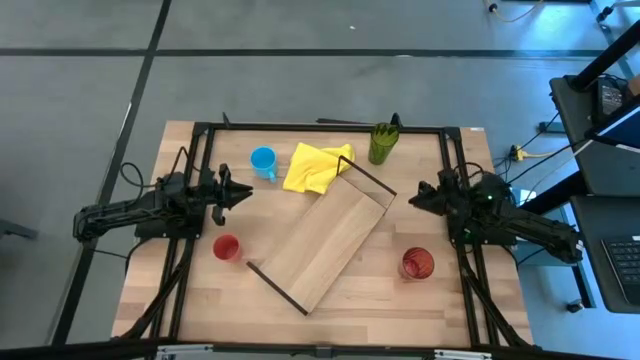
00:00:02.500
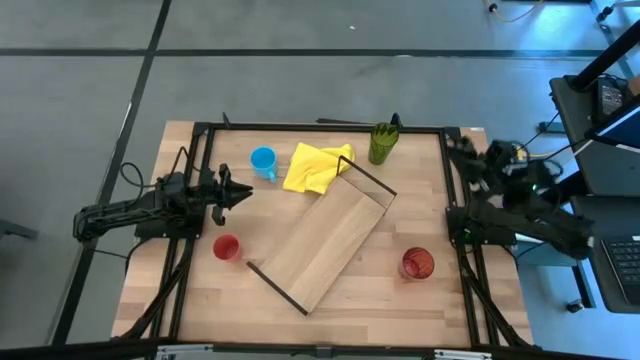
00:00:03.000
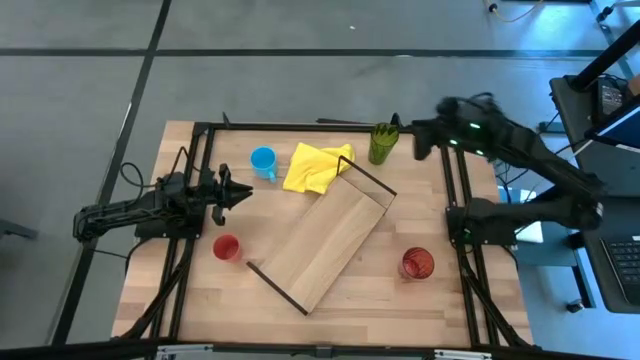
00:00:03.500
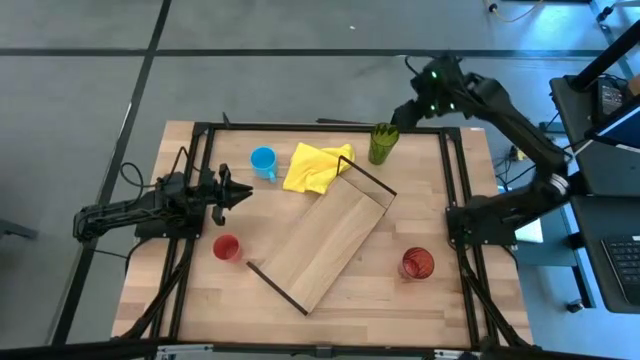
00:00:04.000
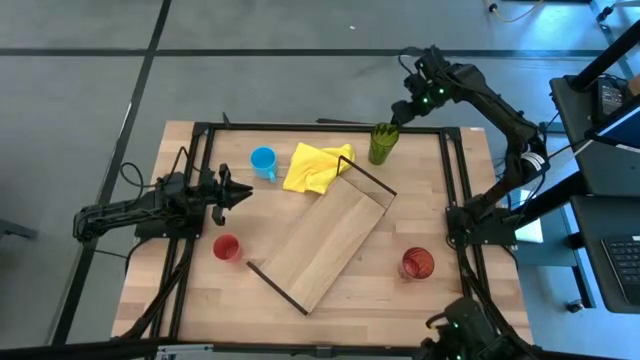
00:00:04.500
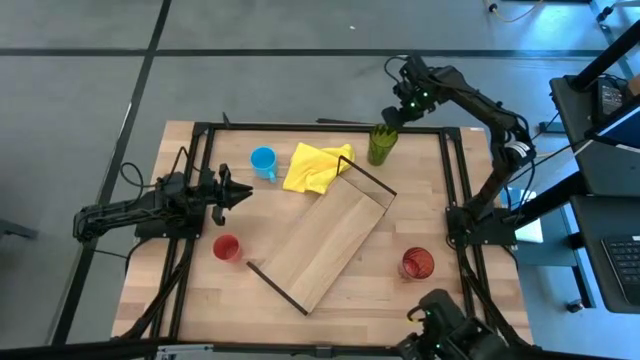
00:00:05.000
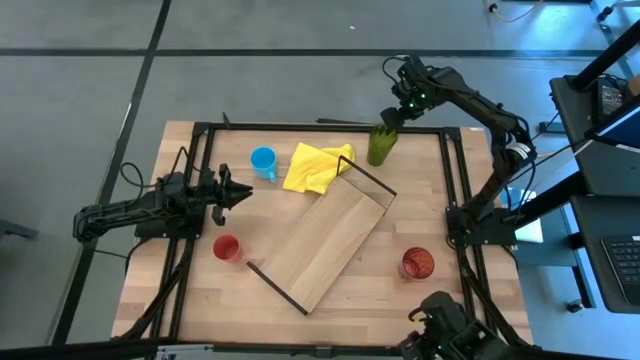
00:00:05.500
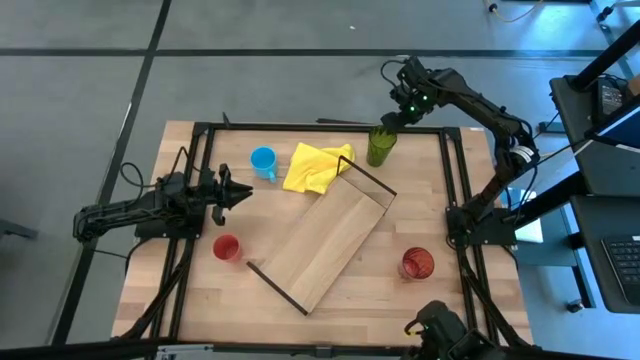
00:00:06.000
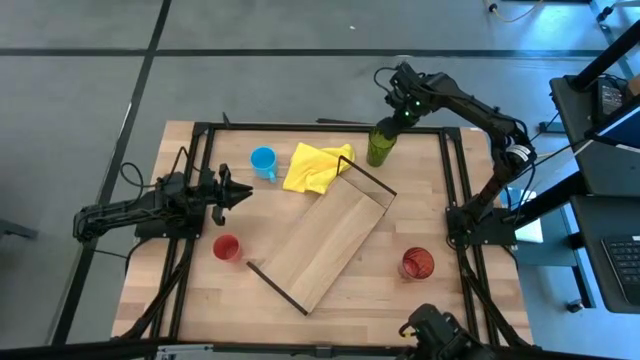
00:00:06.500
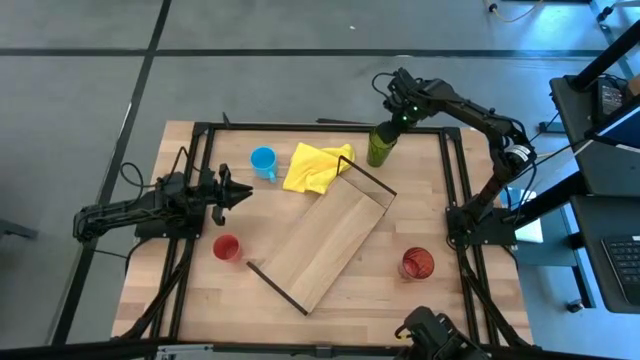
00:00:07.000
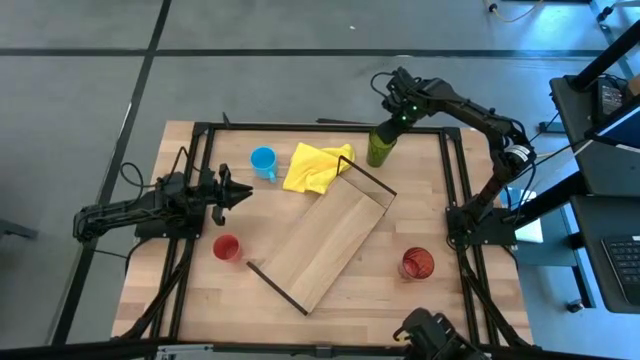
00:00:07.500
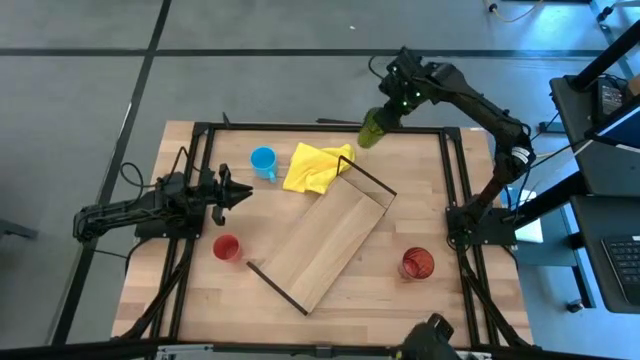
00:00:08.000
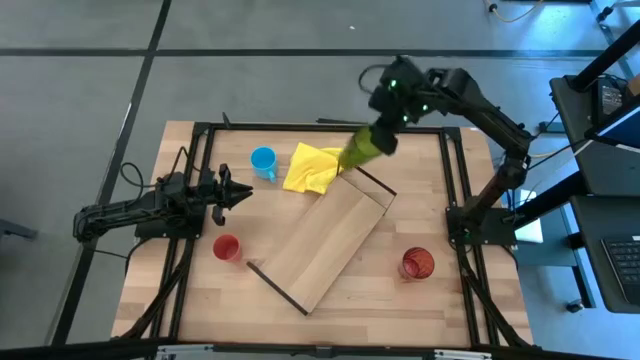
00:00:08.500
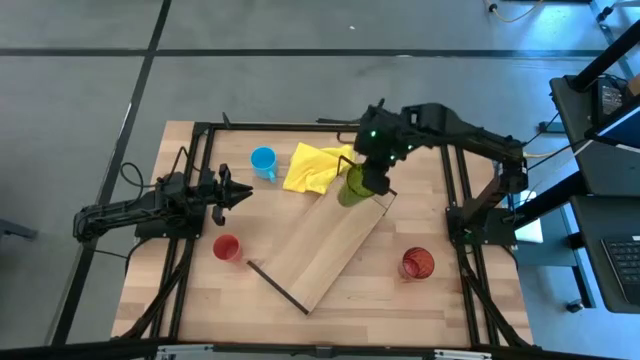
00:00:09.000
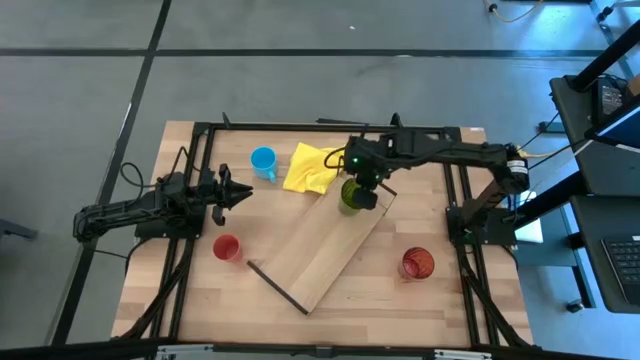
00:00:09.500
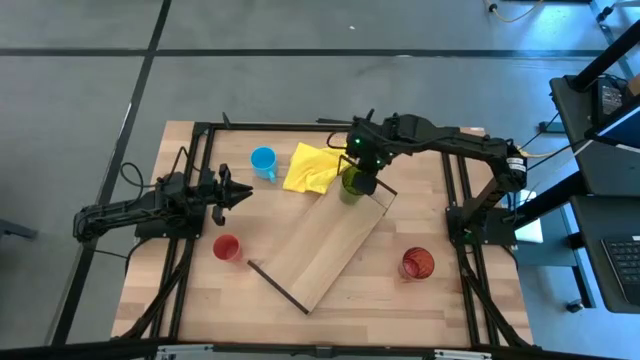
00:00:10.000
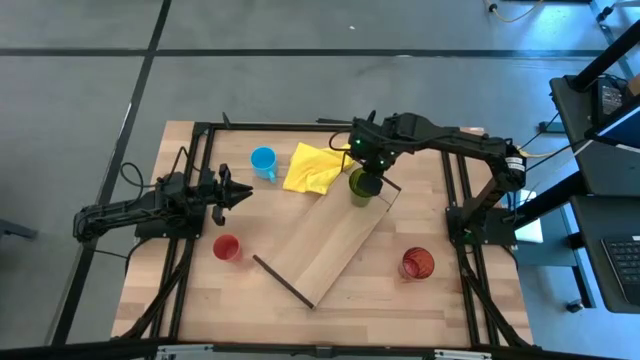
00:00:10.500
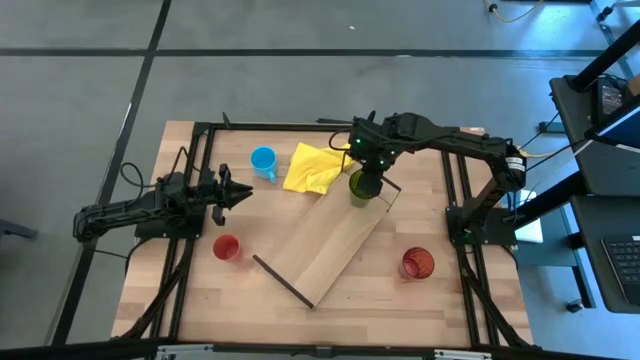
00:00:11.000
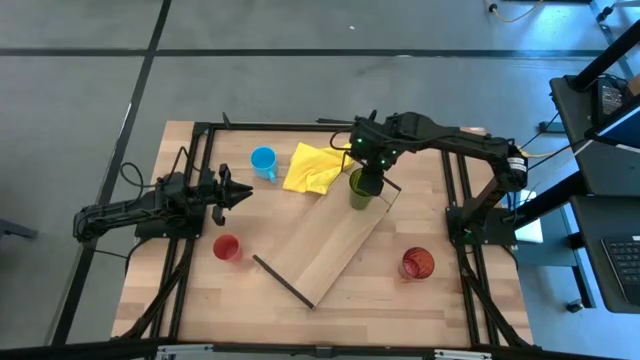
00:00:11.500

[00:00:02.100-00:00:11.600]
Task: Stack small to large cups/mugs on shelf
Put the green cup on the shelf

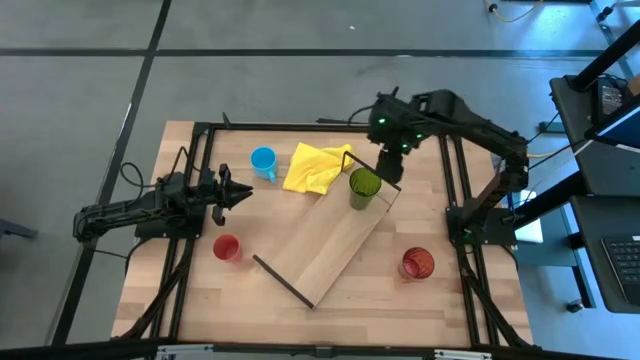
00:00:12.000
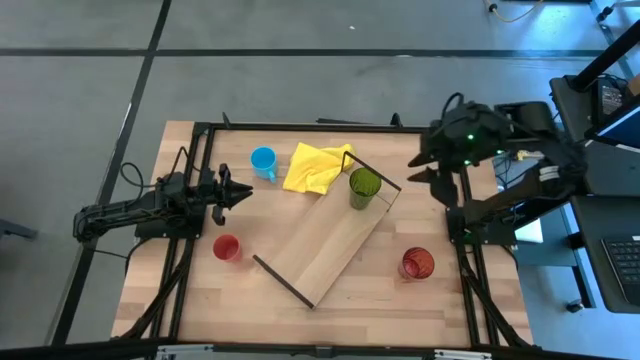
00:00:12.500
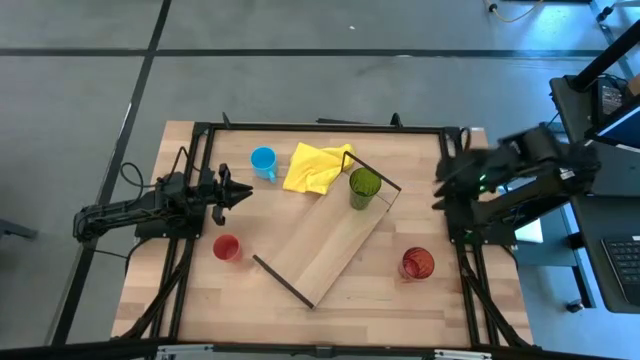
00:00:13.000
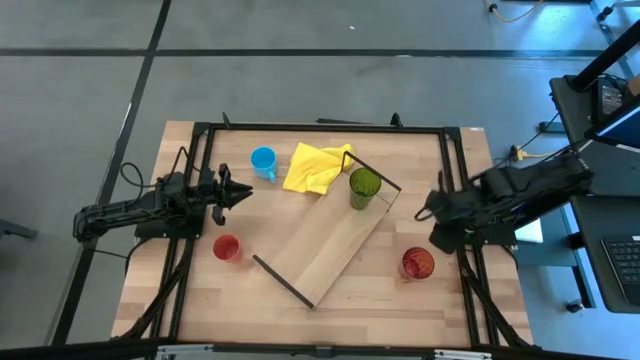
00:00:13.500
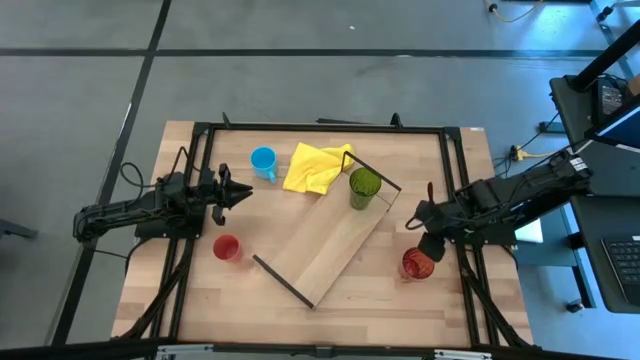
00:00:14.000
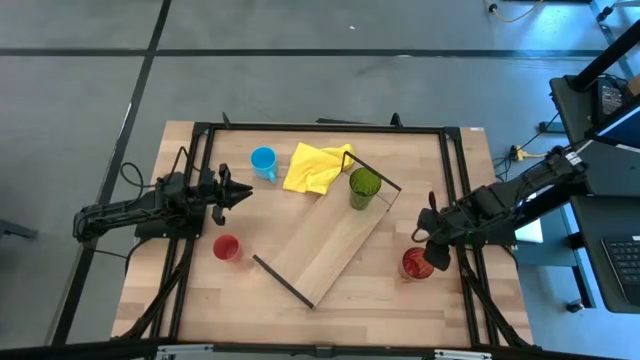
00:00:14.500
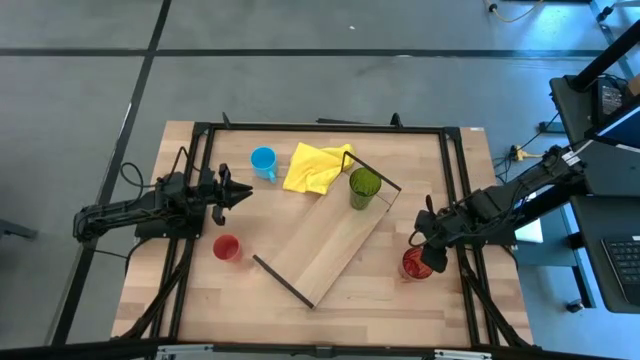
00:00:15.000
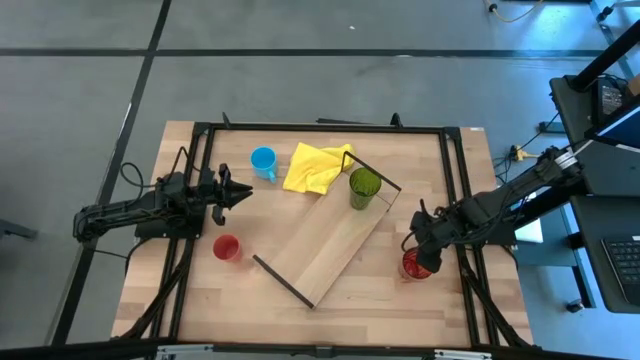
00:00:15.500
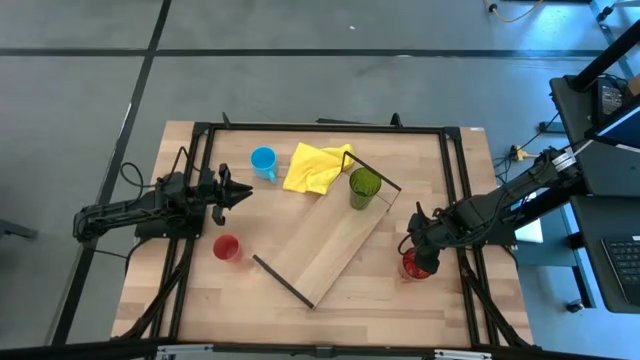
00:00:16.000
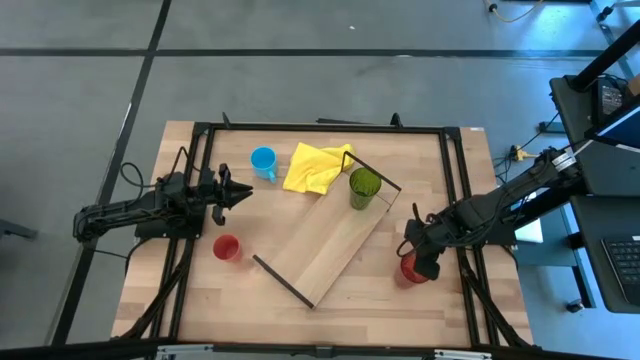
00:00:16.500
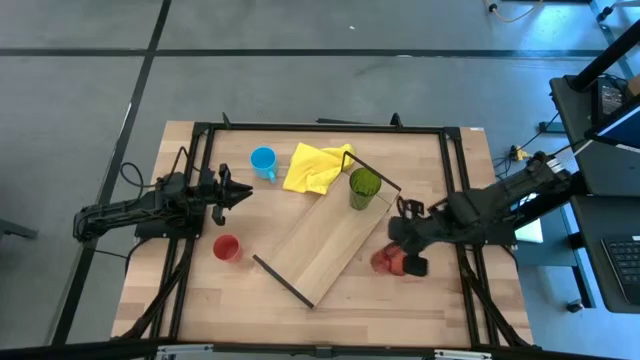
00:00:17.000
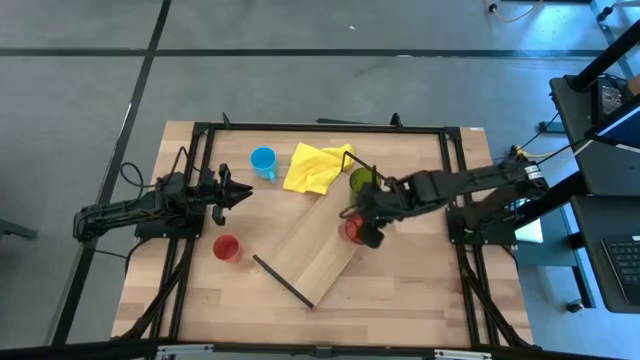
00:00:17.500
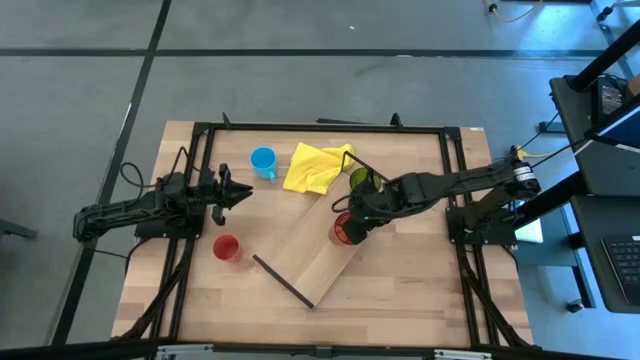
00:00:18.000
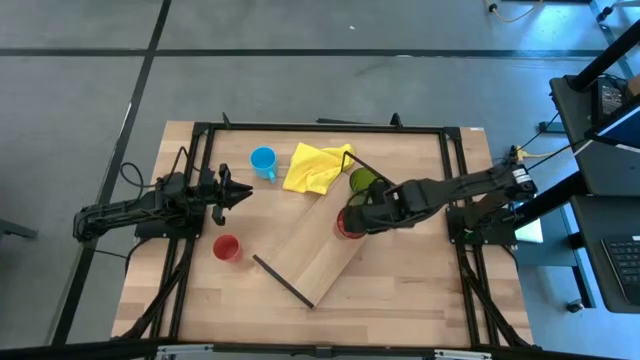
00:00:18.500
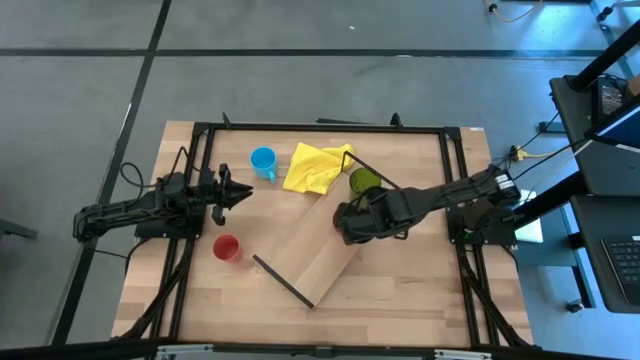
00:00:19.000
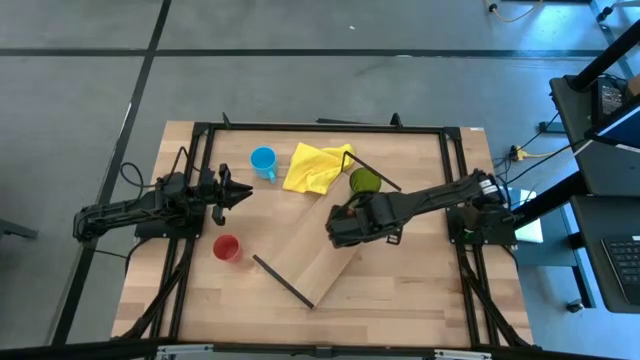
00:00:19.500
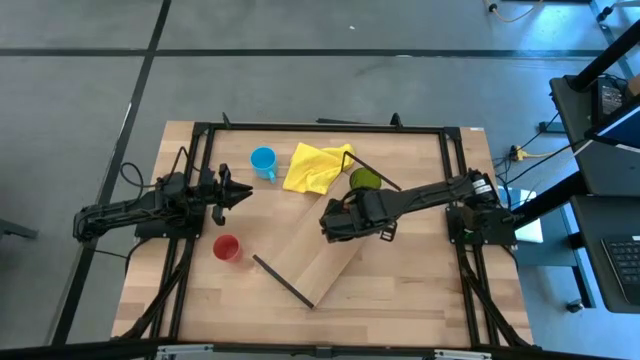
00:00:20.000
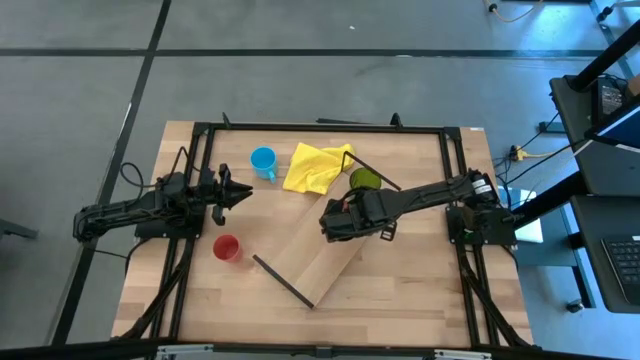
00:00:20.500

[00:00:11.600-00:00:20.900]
Put the red cup on the shelf

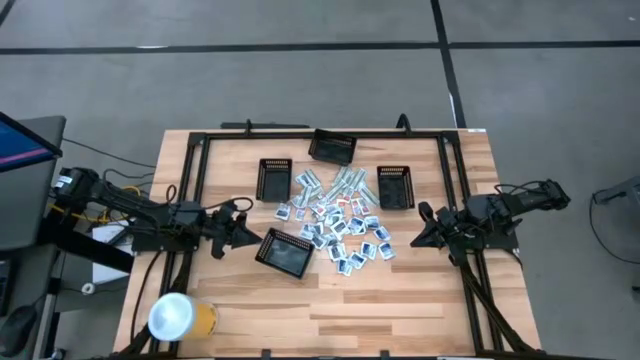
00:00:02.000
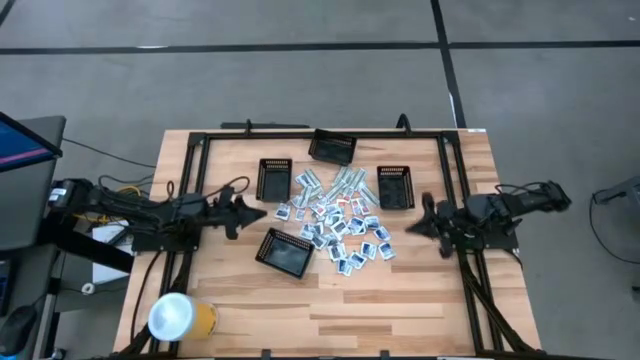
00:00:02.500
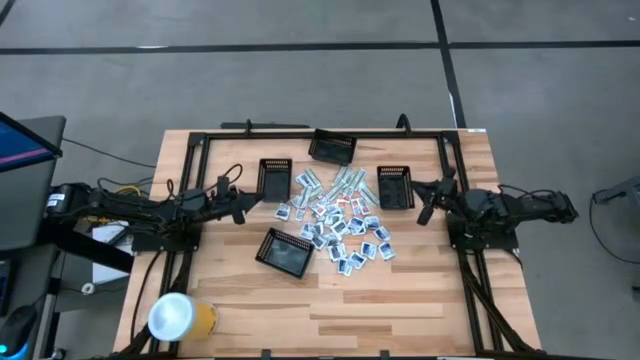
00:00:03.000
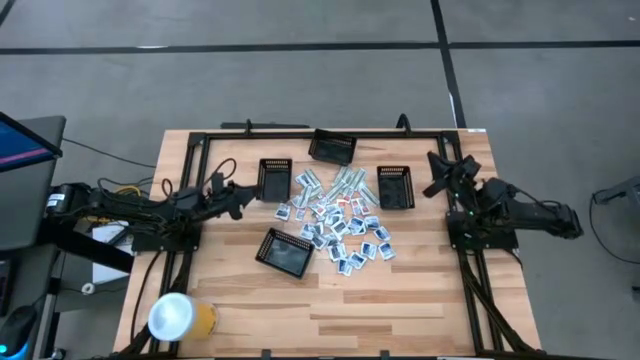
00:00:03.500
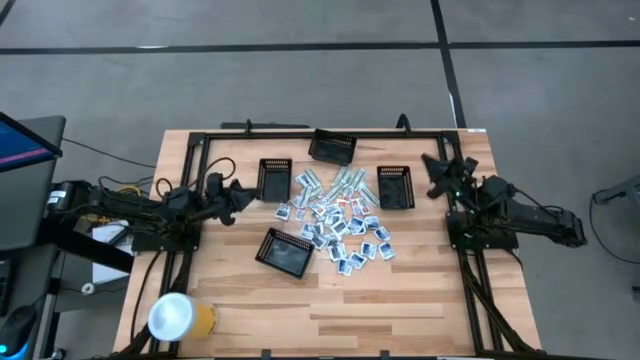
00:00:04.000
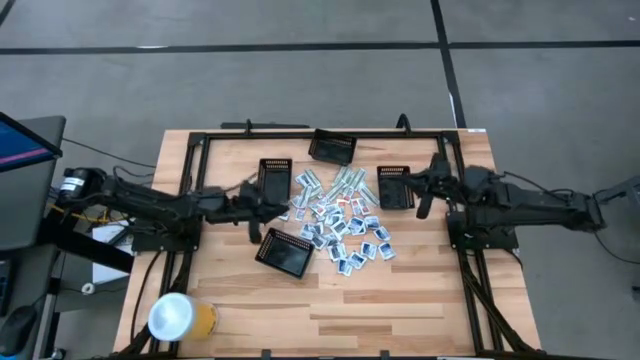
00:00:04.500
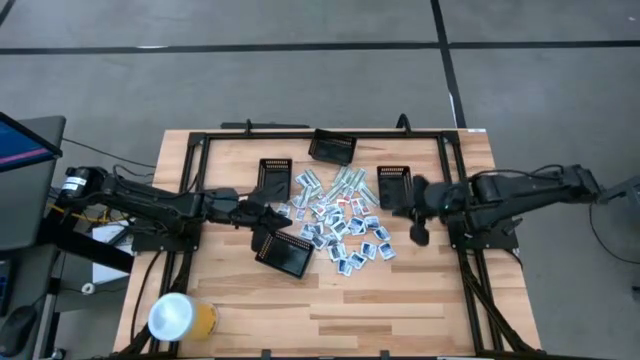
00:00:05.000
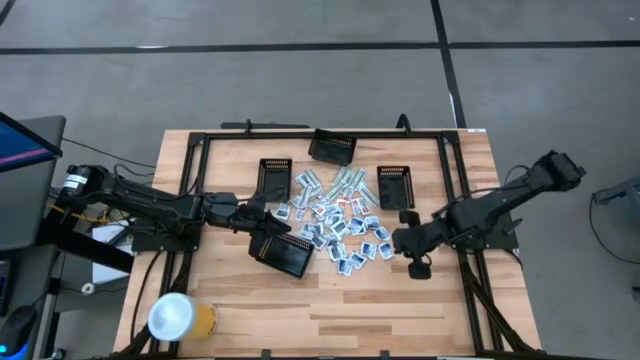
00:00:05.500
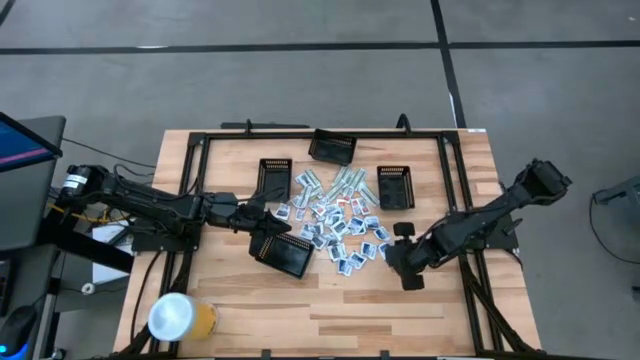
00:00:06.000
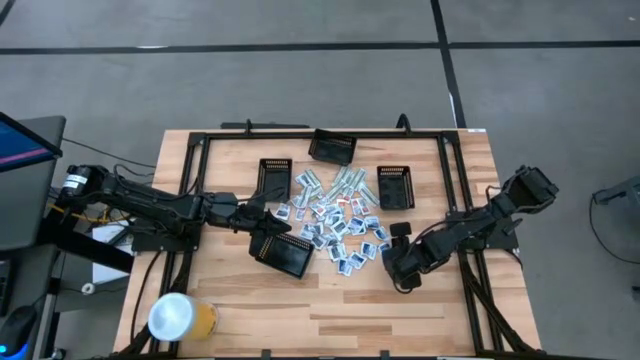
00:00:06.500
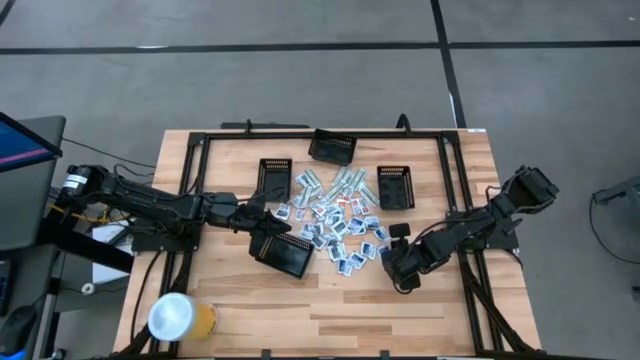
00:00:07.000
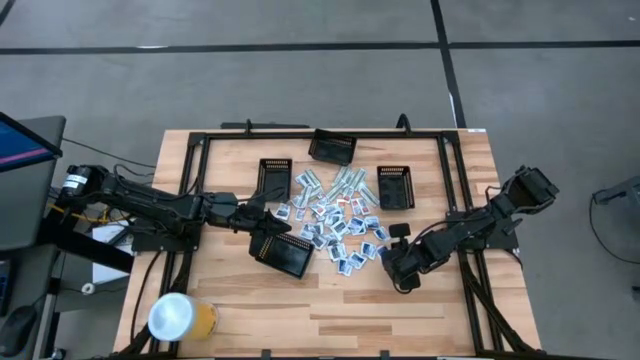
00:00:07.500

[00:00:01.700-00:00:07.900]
Task: Pick & Place First Aid Supplies
Put the white alcohol pad into the right black bin
